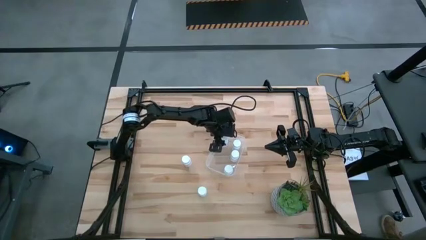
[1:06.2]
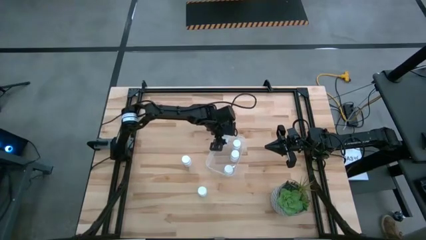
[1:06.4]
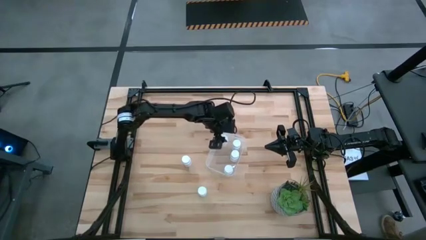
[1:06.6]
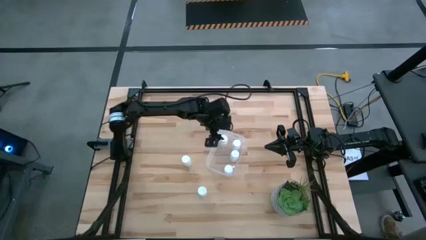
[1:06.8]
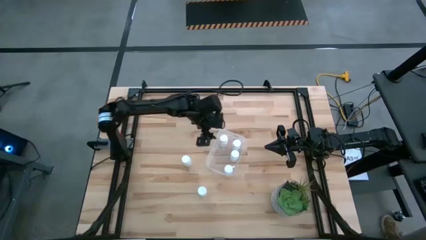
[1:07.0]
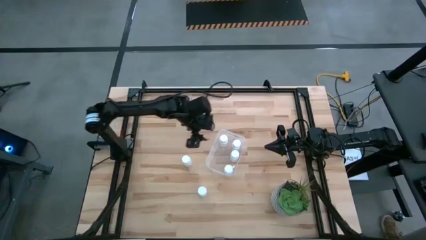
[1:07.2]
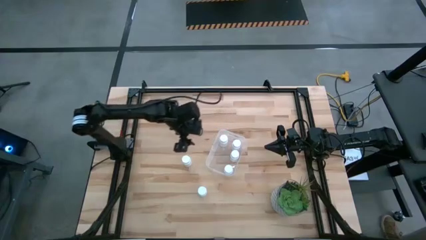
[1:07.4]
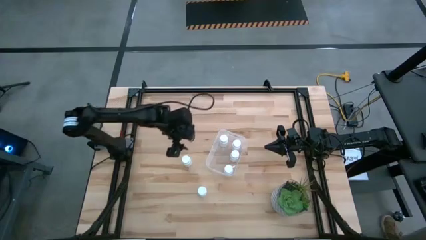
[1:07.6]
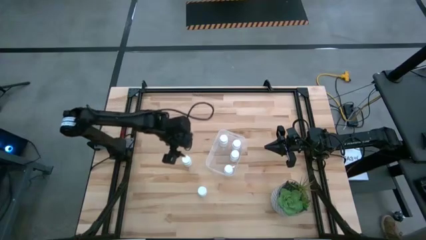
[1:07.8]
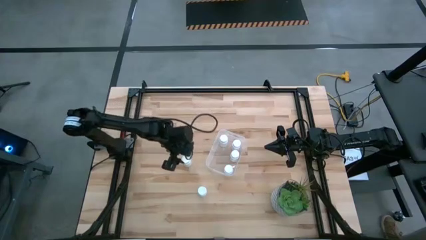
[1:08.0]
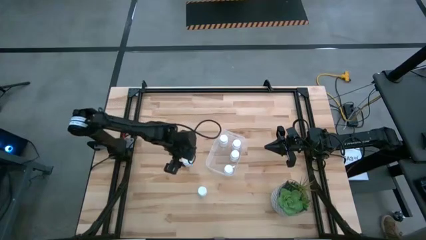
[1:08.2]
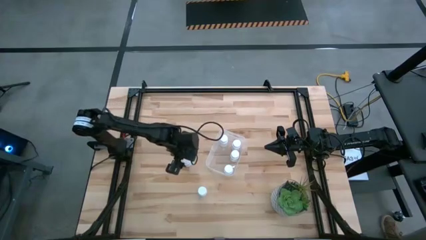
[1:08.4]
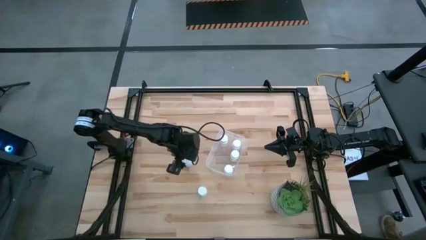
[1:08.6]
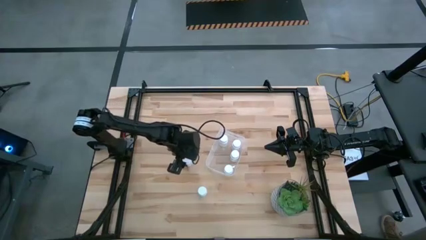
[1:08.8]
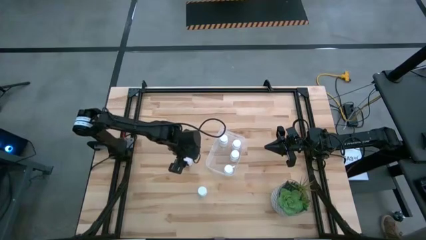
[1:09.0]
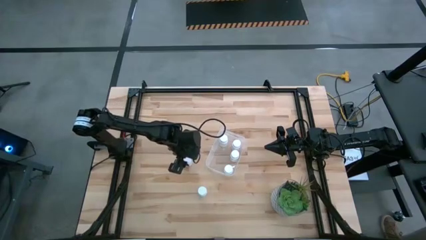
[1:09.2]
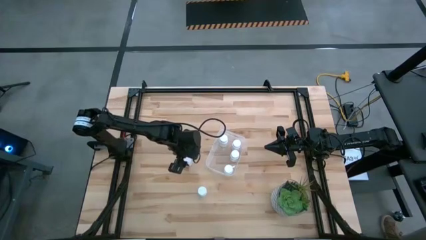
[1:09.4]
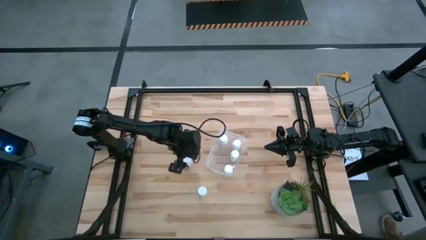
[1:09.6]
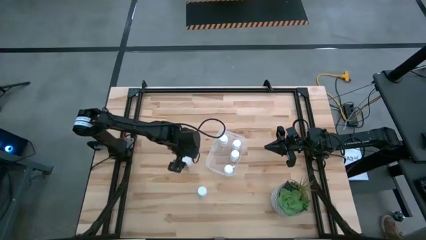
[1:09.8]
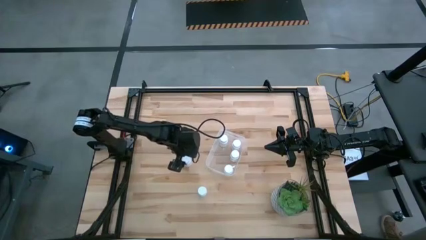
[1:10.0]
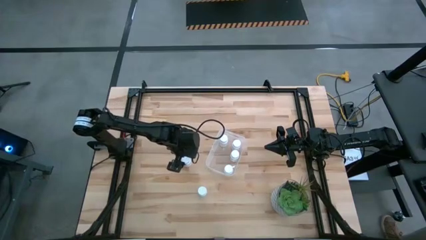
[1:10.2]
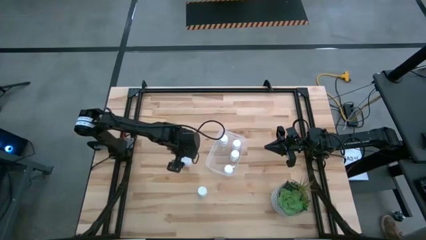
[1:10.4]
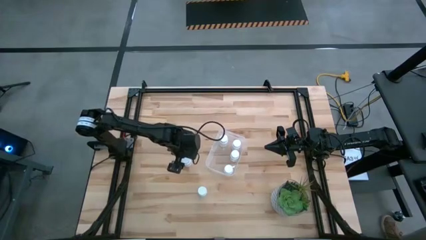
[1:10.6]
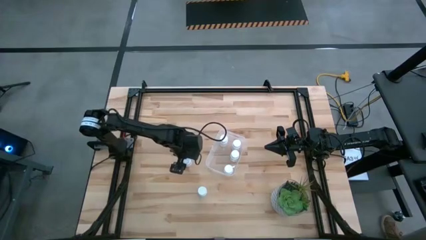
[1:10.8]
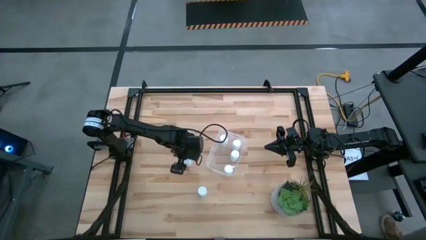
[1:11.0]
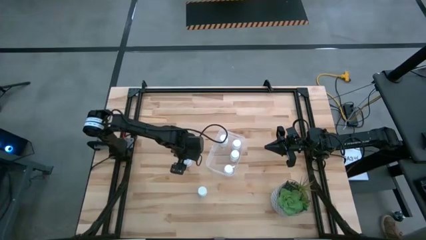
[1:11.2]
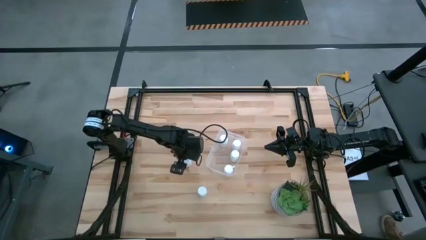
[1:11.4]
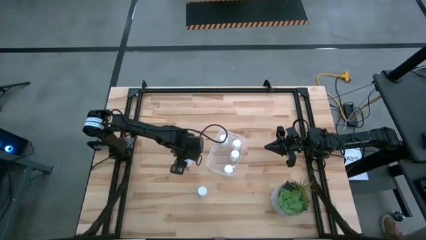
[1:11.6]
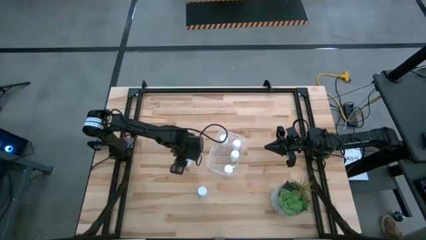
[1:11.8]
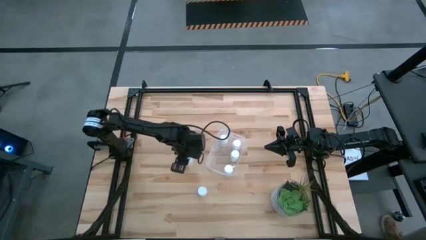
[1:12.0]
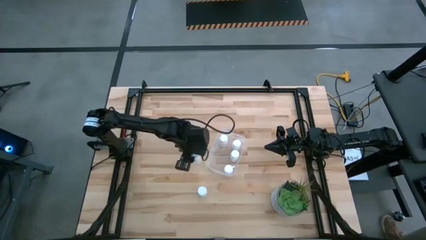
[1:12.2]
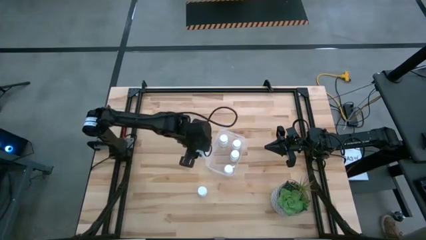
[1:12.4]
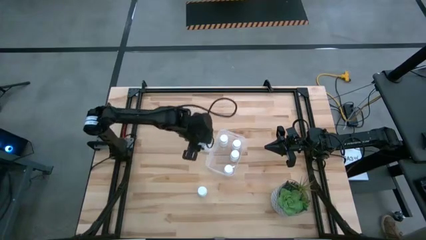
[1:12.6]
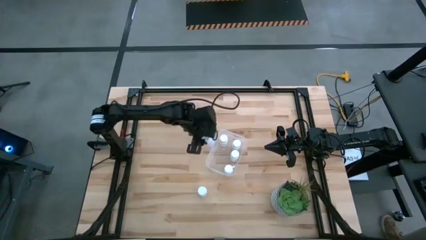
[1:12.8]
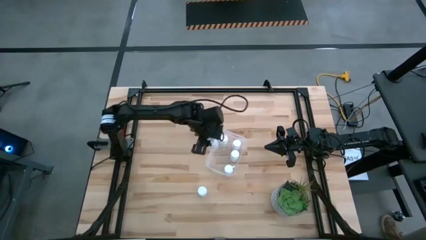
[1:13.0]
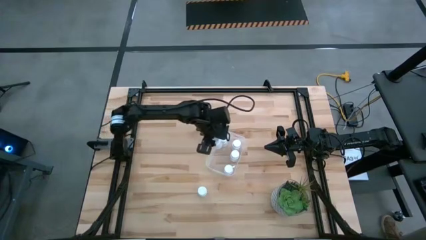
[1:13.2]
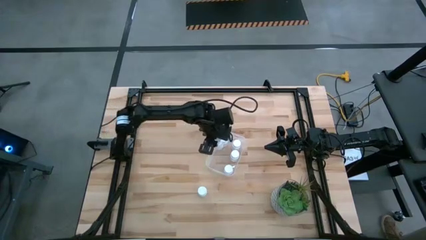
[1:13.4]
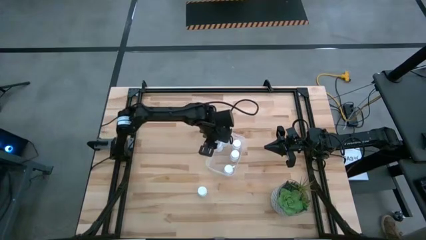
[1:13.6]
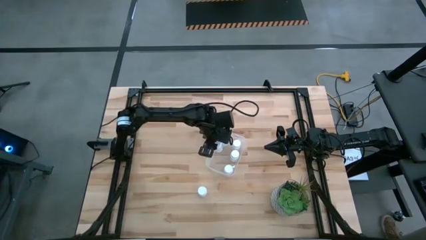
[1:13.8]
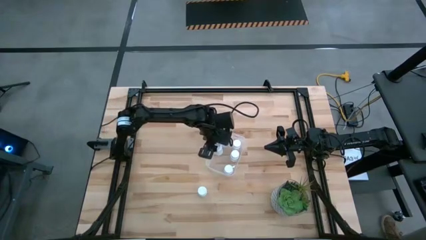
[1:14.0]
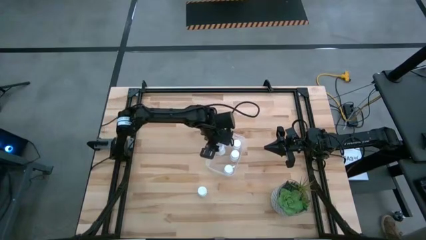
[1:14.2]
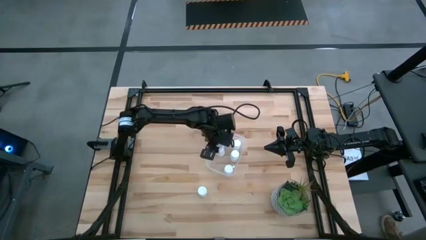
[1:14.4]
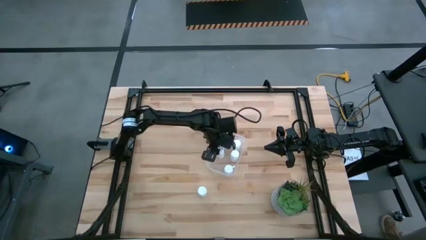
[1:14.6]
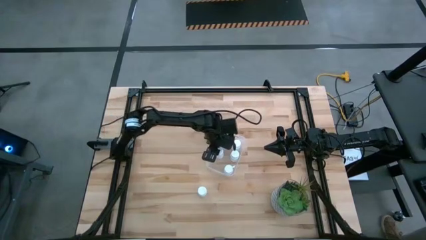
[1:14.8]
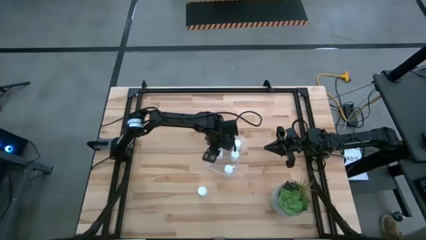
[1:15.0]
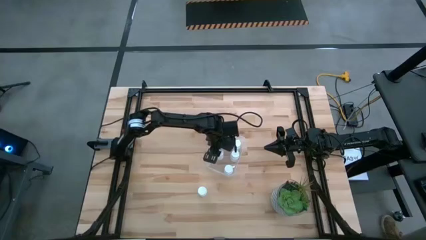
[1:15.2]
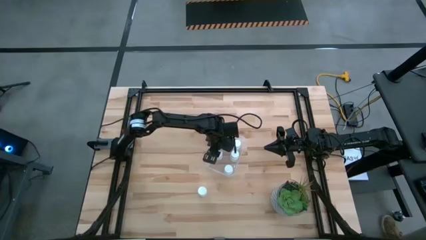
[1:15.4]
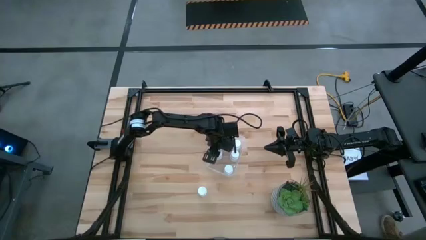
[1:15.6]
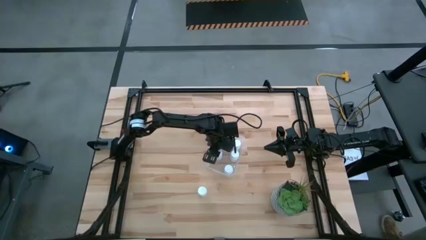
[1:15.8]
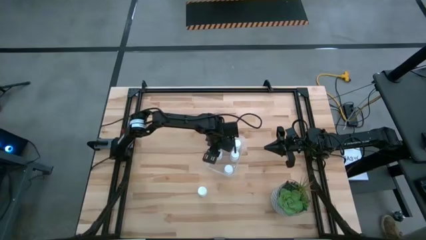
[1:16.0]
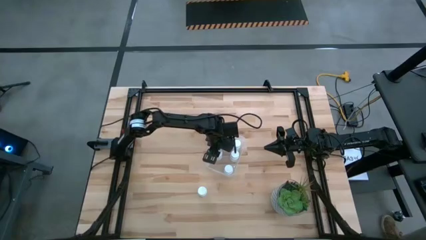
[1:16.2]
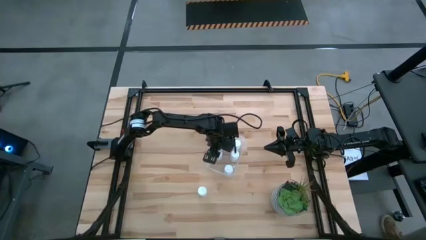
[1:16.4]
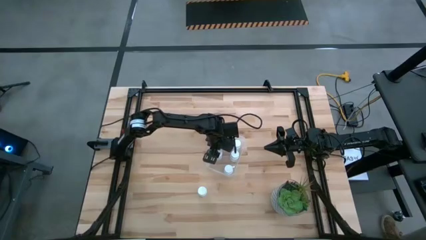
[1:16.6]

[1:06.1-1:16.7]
Task: Pick and place pill bottles into a basket
Put the medicine bottle into the transparent bin

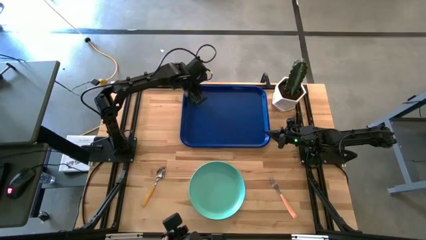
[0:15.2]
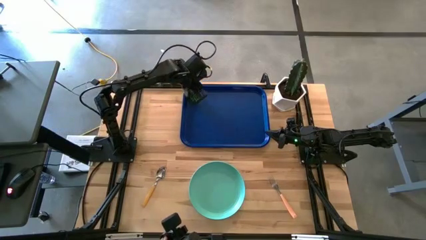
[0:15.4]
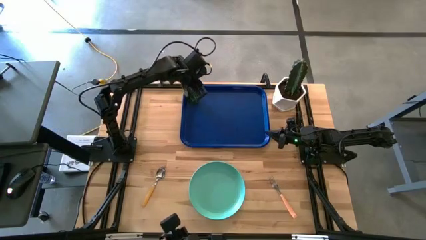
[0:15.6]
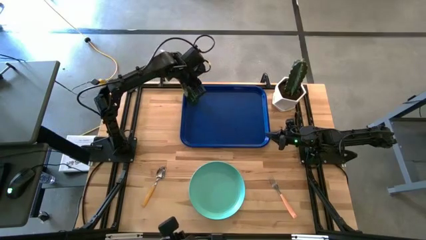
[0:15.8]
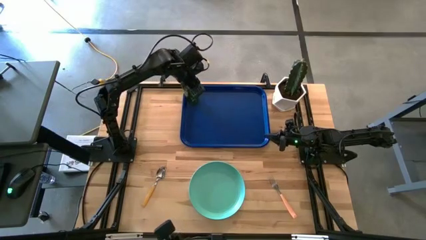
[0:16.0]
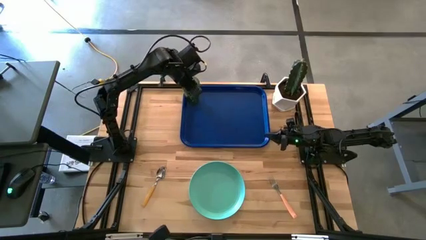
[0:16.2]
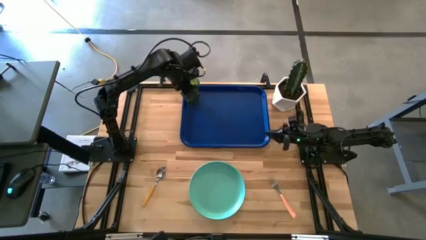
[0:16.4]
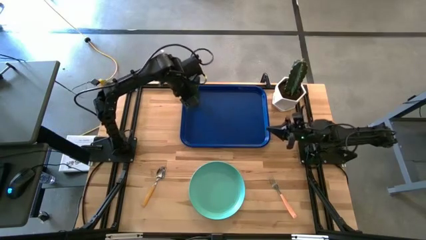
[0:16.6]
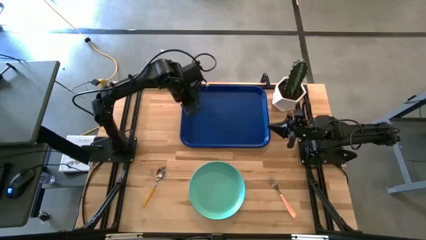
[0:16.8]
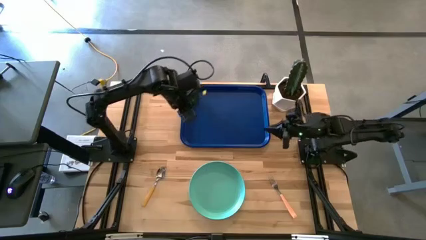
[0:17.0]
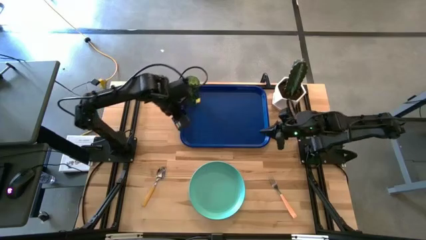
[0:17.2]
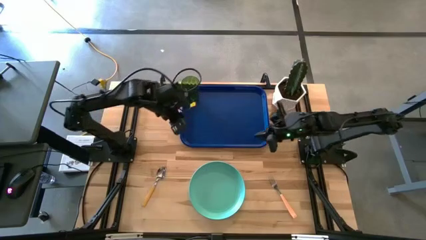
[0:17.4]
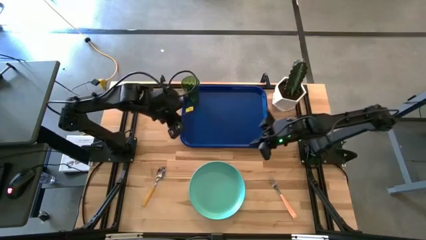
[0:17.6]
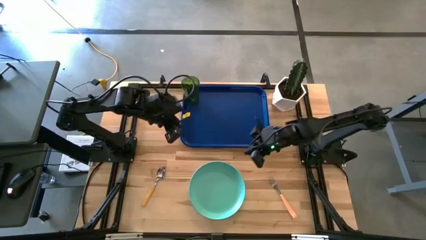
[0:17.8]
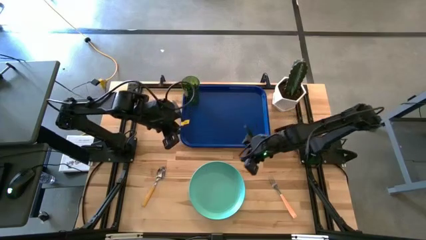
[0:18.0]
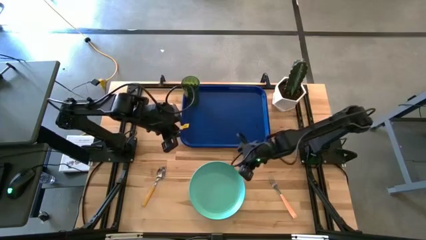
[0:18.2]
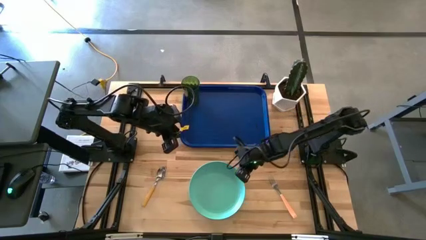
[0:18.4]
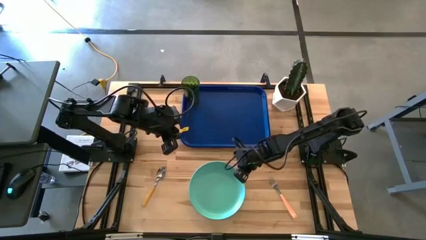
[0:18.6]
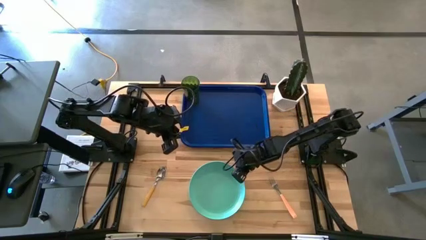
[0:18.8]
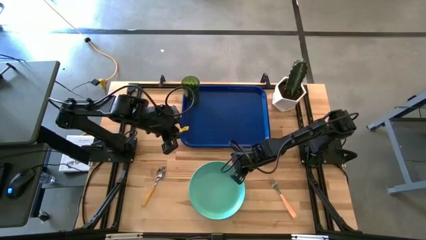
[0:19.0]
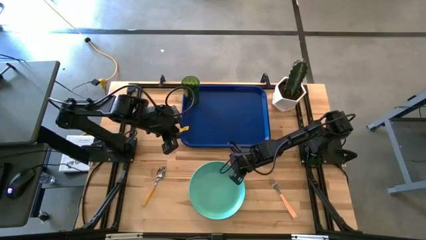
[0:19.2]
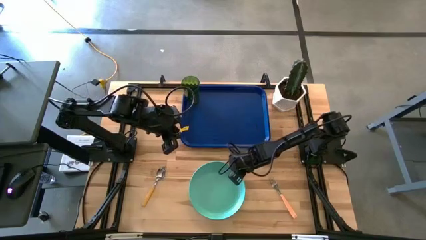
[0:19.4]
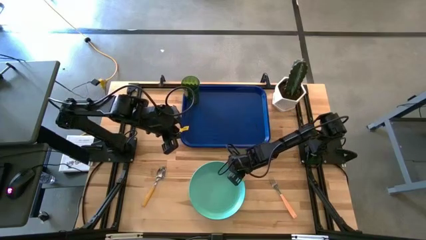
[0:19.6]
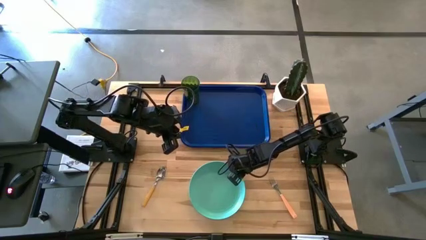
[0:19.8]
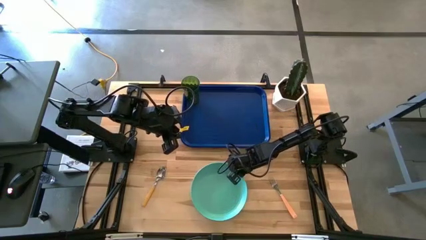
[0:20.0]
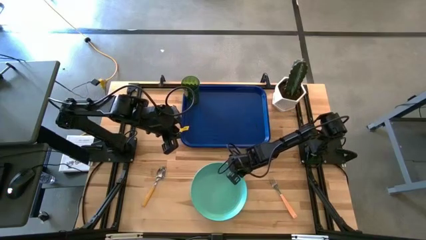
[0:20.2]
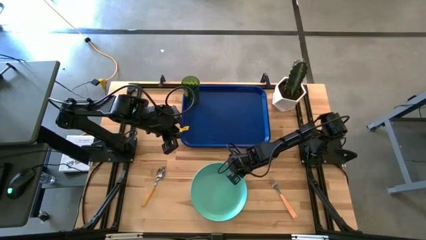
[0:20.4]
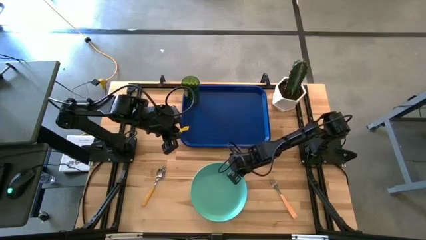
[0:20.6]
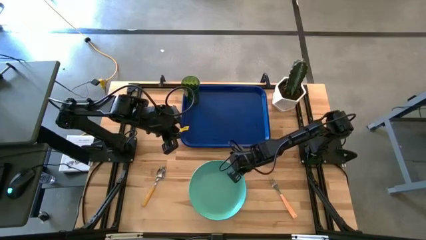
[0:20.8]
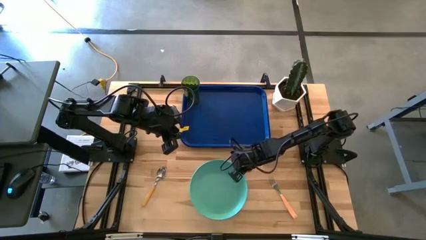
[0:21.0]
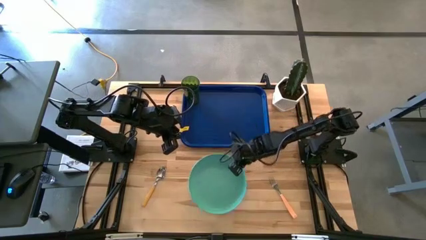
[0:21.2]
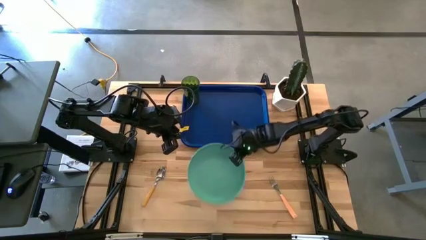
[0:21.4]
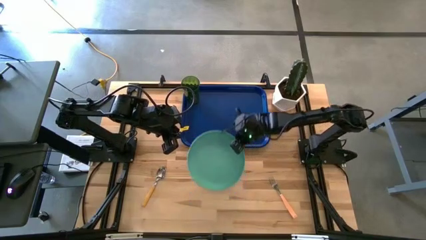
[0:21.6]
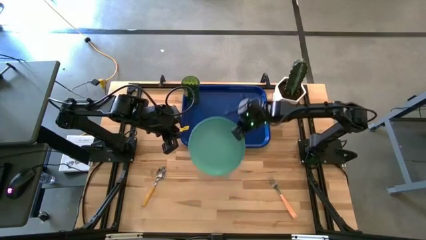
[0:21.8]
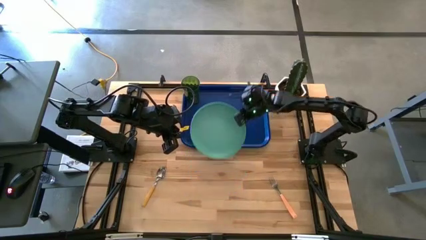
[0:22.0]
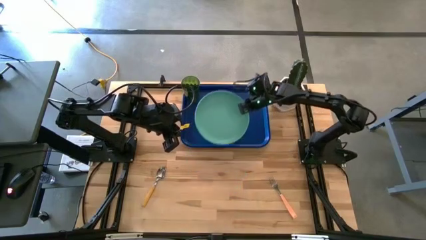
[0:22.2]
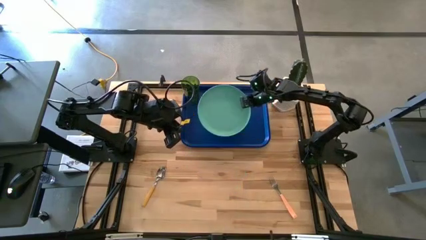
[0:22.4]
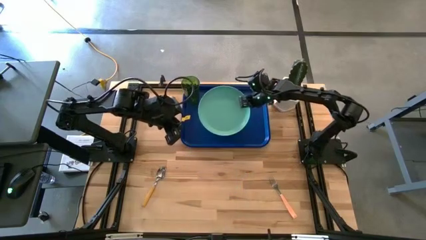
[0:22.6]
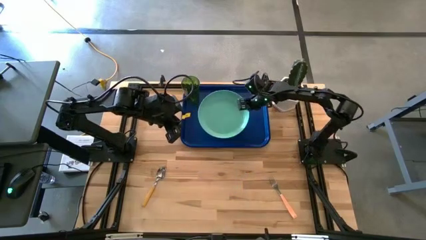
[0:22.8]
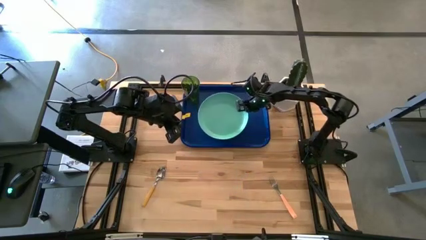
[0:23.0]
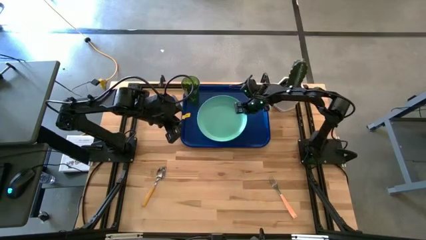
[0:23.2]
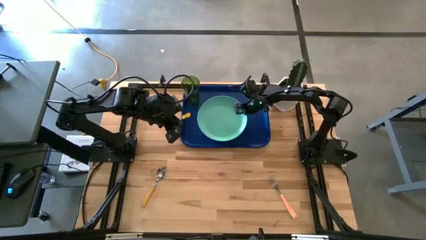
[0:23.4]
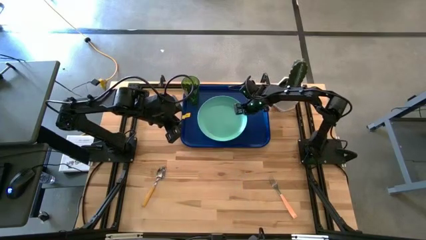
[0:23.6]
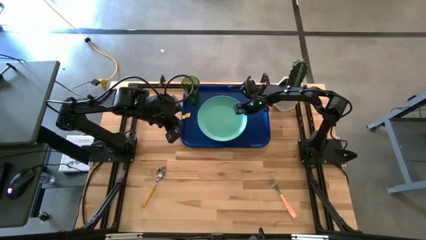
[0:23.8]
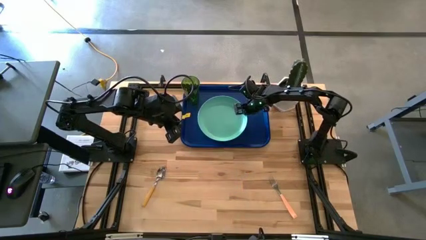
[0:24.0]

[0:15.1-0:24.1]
Task: Pick and place plate/cup/fork/spoon on tray
Put the green plate on the blue serving tray
